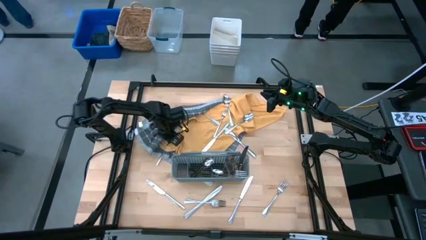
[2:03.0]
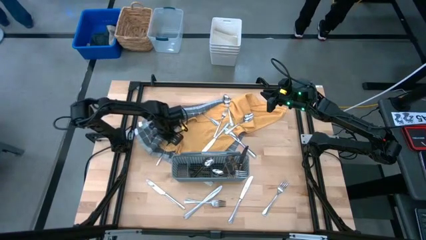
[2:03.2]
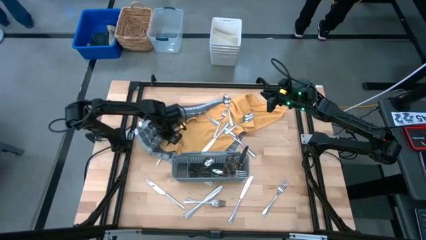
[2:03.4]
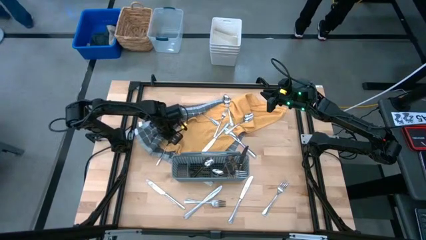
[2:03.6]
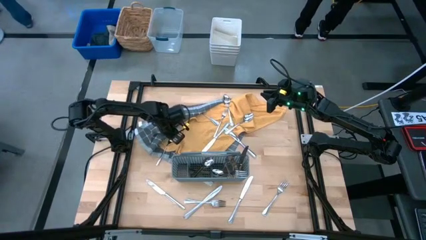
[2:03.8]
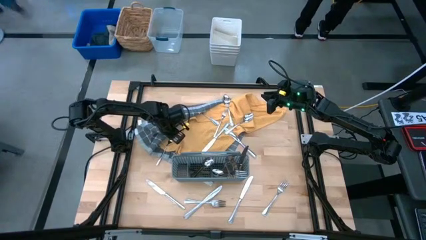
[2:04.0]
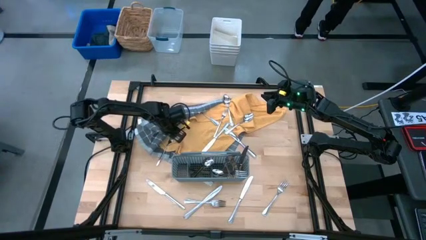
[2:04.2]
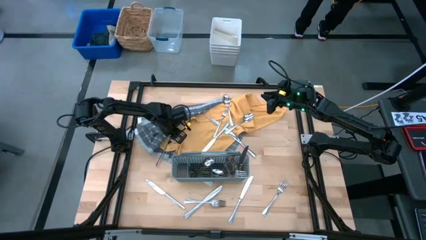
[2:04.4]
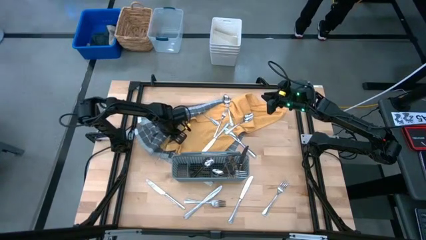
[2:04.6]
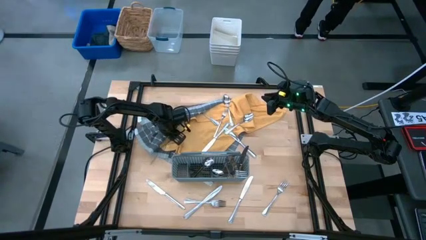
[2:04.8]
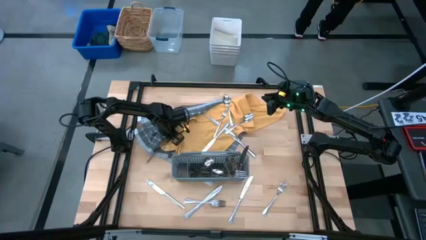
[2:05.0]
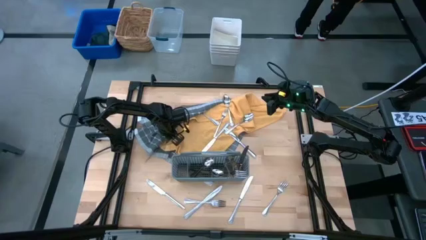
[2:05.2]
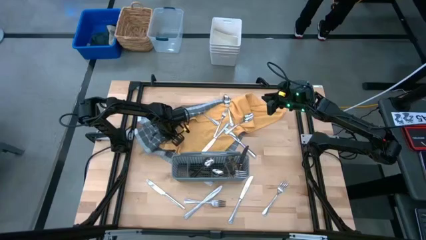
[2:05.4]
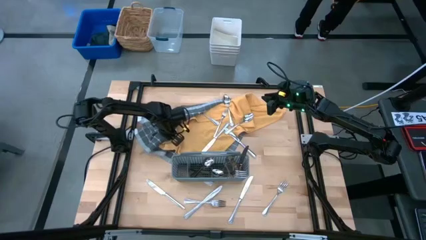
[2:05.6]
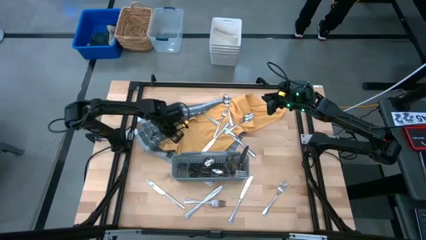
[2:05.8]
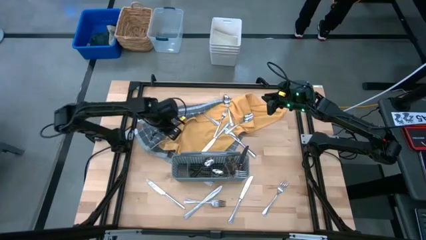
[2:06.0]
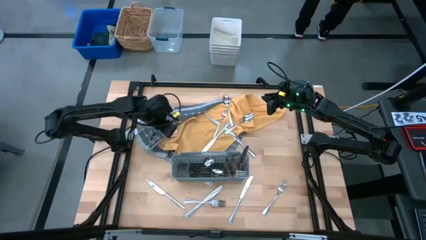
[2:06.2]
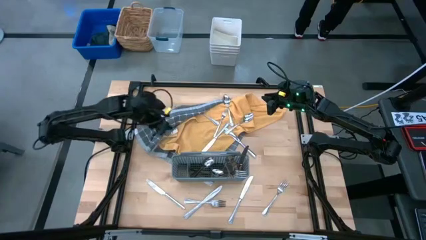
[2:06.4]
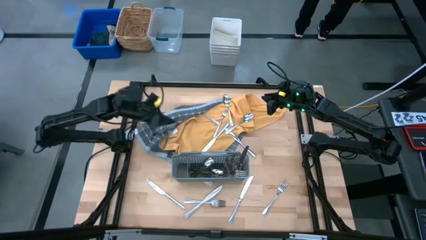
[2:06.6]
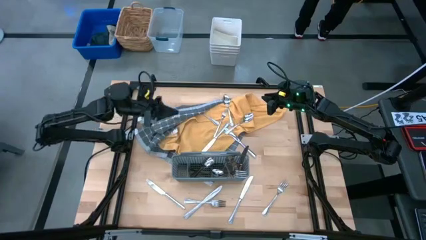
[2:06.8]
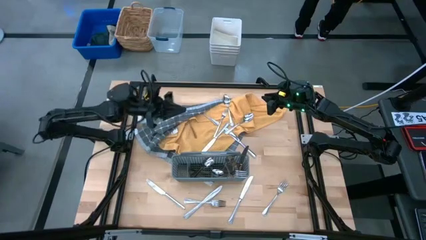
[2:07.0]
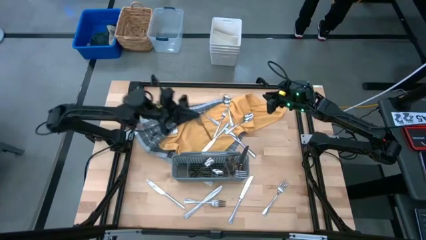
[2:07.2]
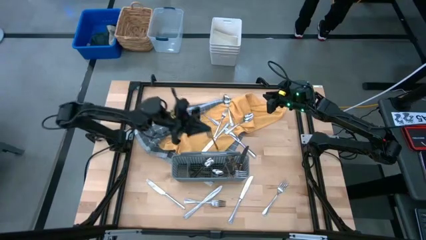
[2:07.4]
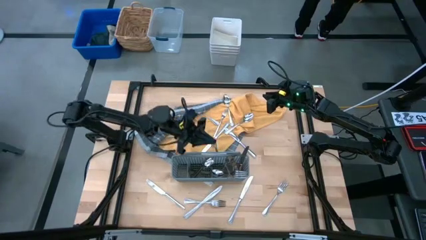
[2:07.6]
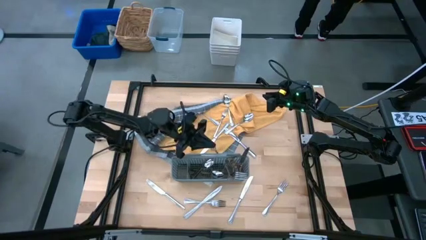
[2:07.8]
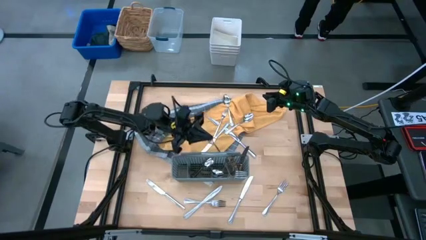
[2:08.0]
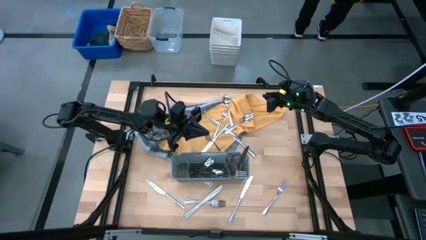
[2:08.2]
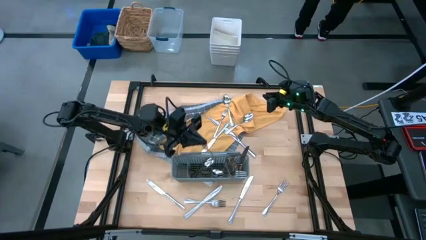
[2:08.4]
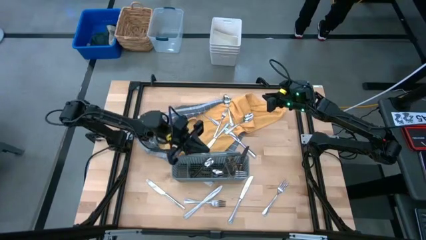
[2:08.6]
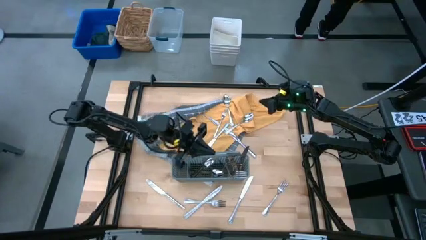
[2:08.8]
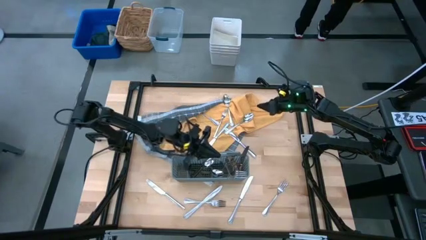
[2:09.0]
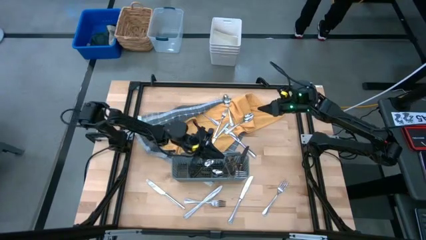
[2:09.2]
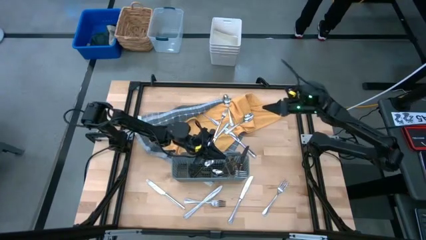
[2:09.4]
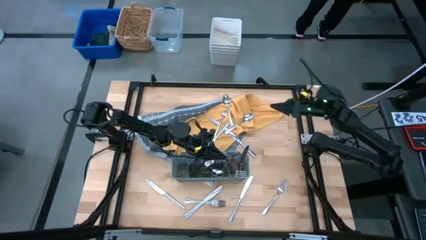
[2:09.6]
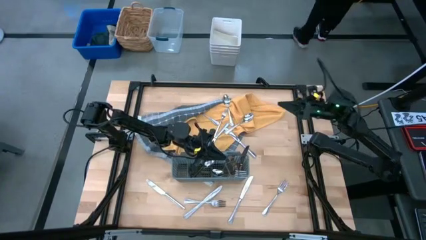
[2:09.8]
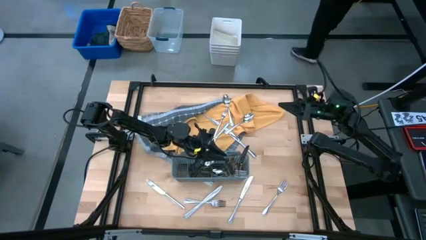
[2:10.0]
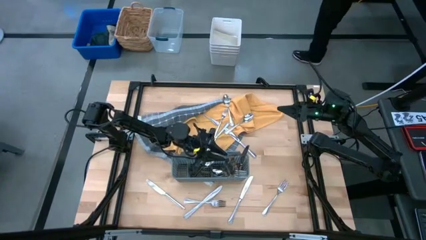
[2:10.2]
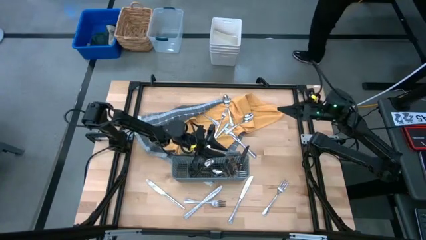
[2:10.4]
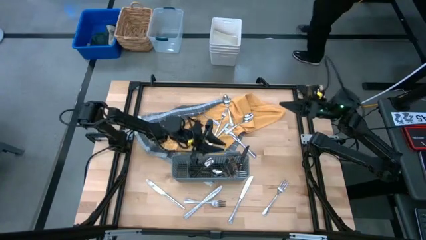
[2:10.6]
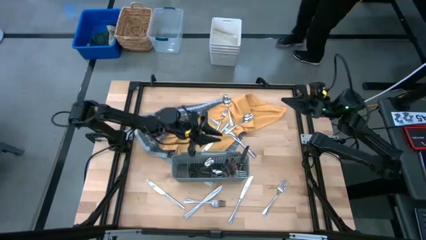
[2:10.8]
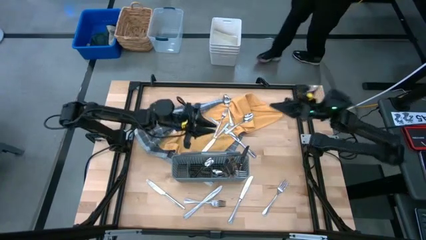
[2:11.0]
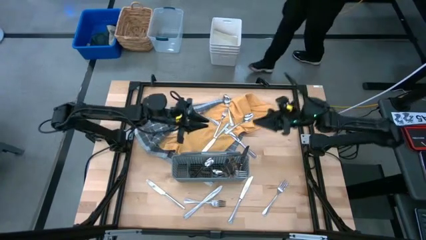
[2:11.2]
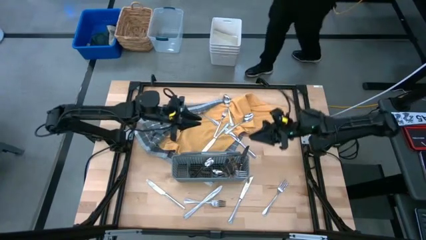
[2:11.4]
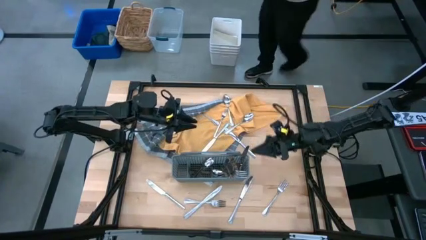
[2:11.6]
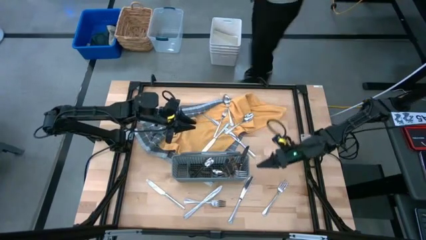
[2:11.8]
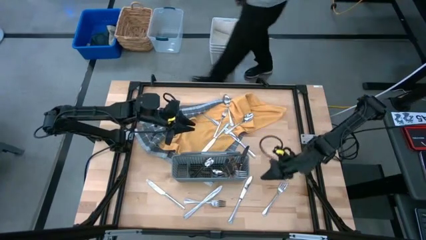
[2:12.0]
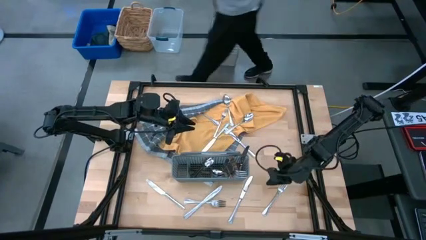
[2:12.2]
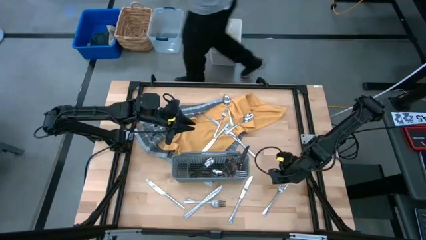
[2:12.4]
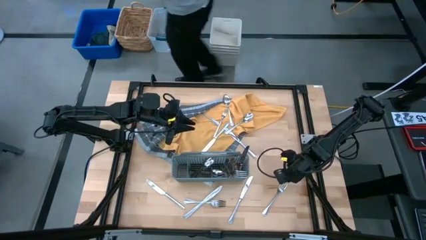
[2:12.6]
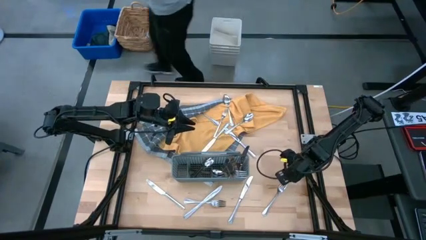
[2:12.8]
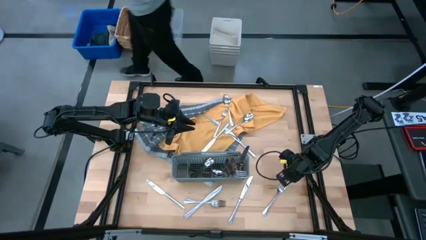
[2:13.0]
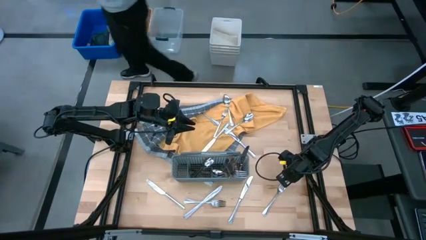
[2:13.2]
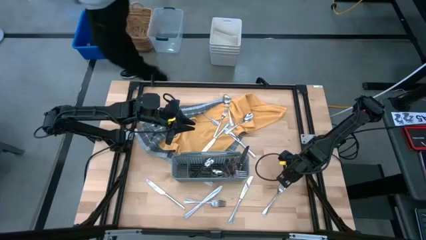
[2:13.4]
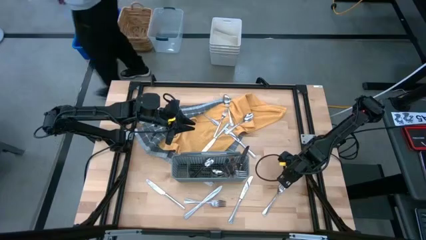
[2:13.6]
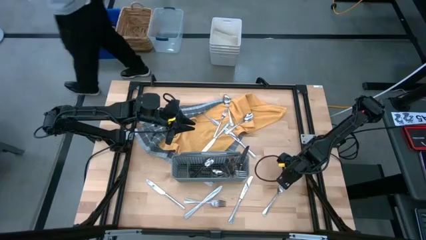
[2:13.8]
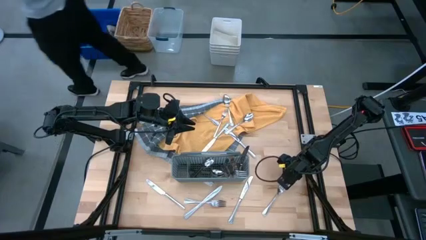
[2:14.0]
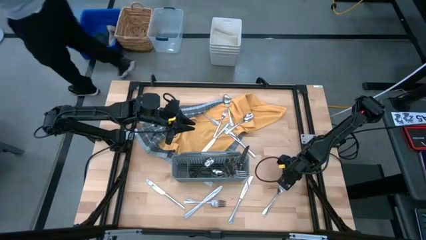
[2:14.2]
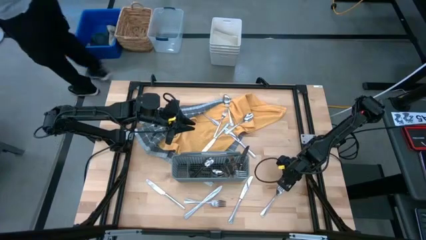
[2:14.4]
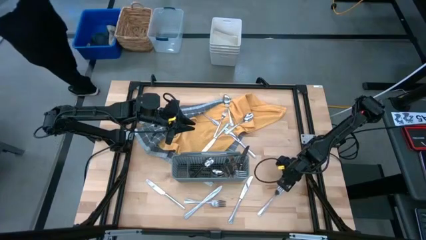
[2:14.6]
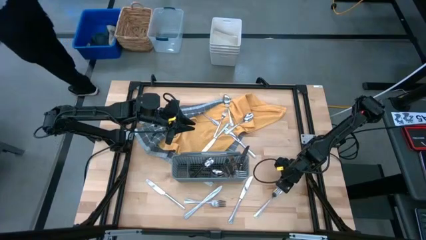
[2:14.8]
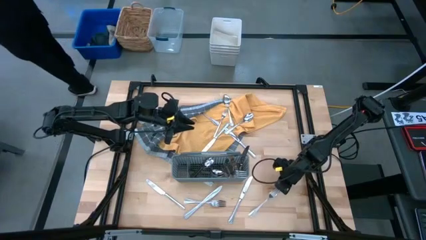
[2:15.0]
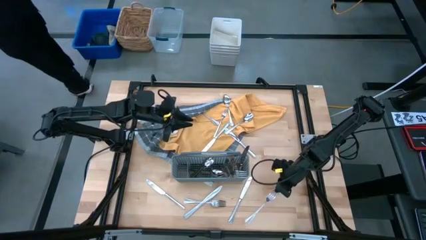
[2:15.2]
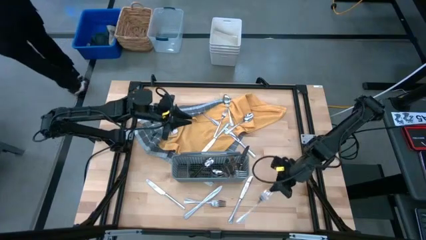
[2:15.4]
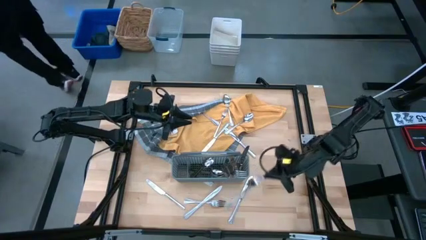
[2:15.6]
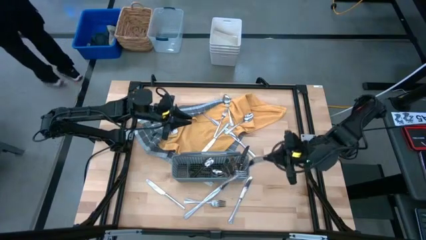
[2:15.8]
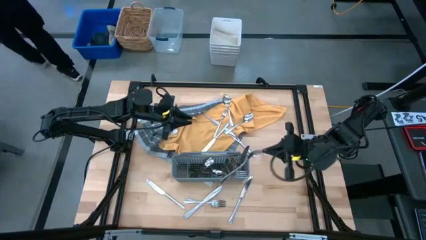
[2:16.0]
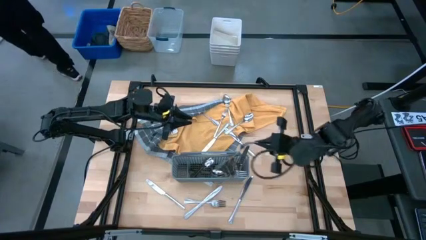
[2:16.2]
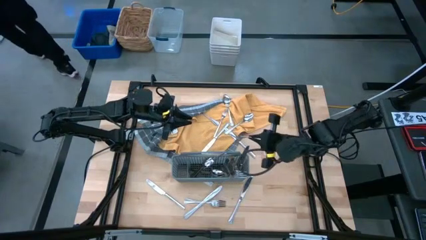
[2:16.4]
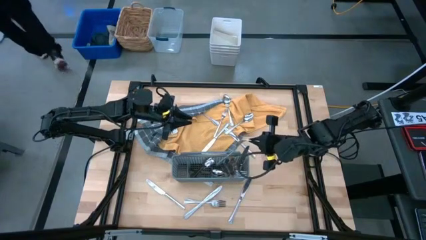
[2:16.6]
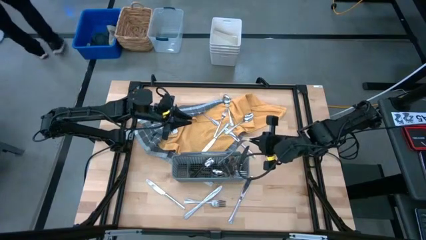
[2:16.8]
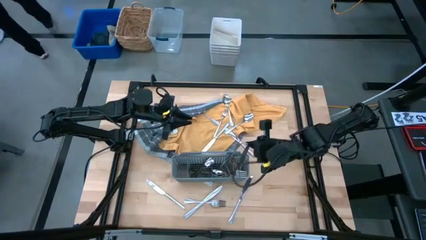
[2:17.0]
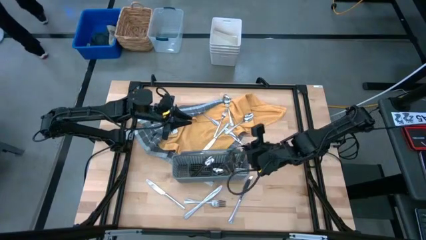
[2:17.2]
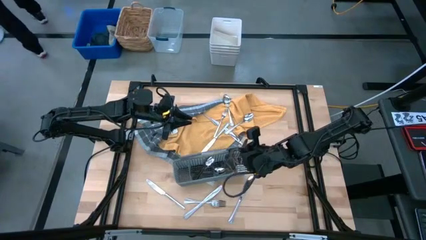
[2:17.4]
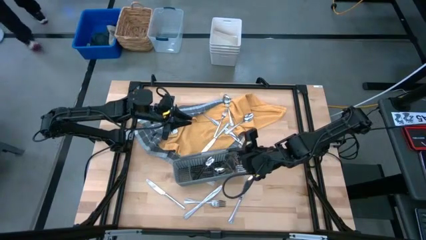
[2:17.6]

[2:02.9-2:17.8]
Task: Sort silverware
Put the silver fork into the gray silverware basket
